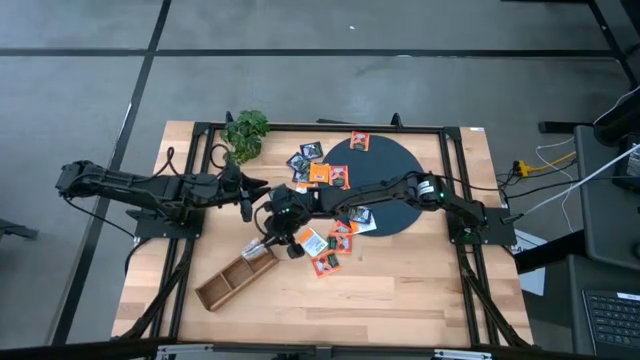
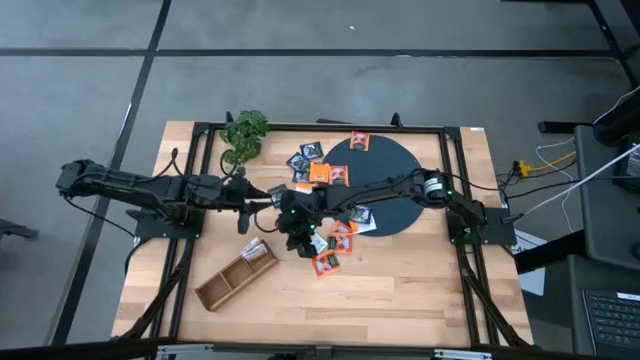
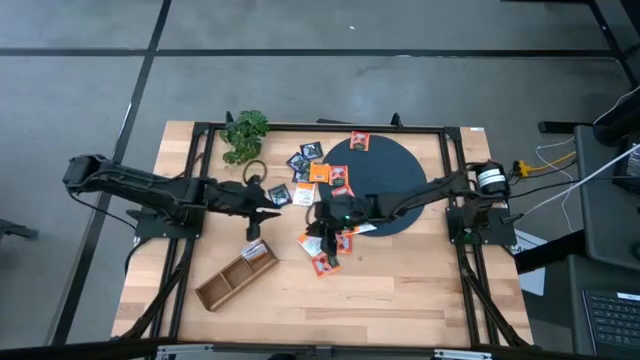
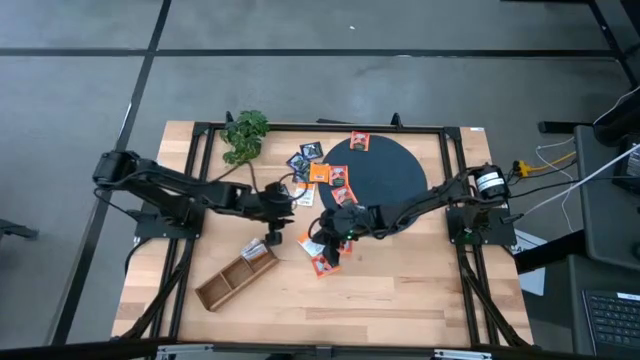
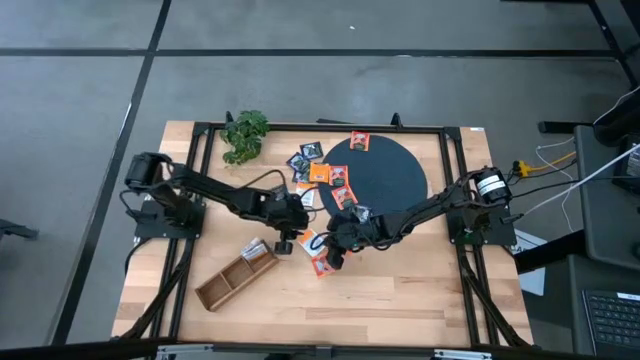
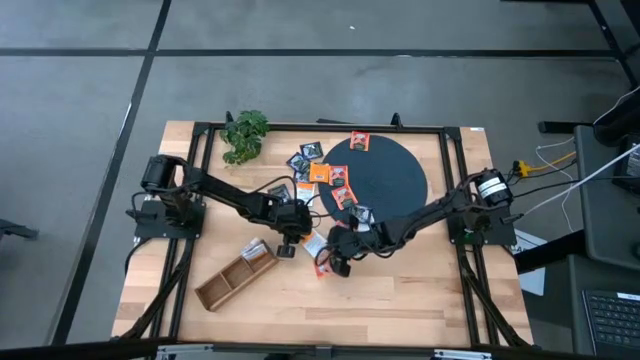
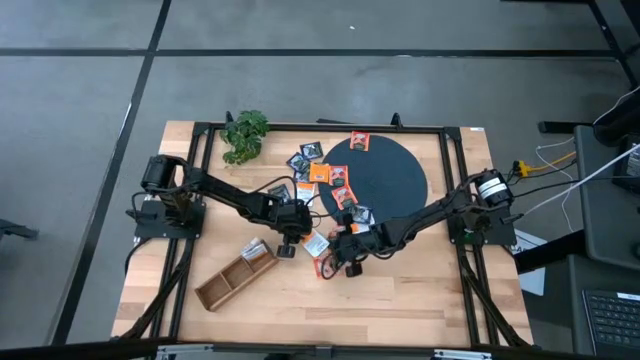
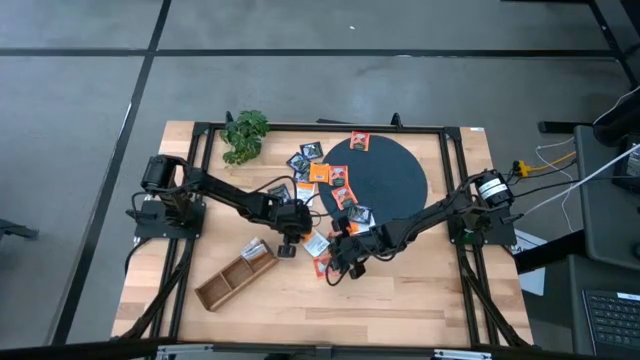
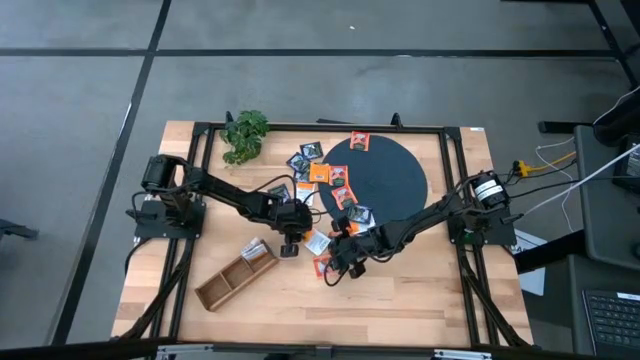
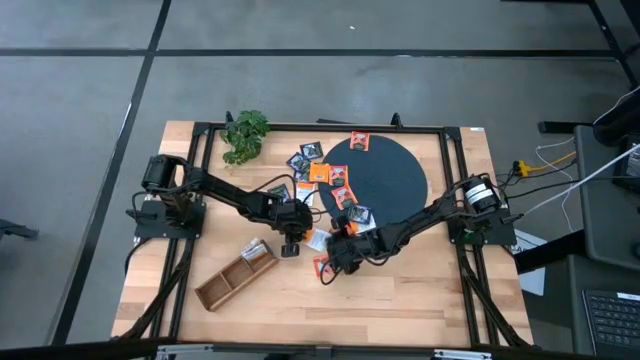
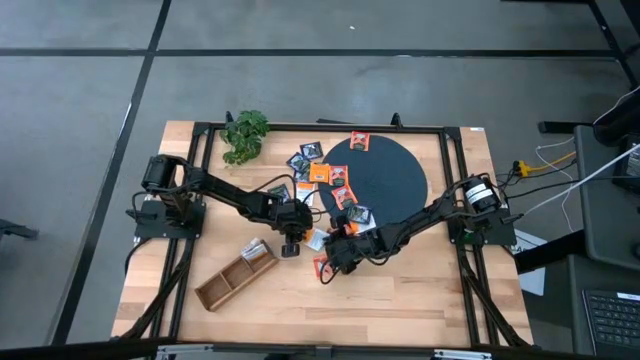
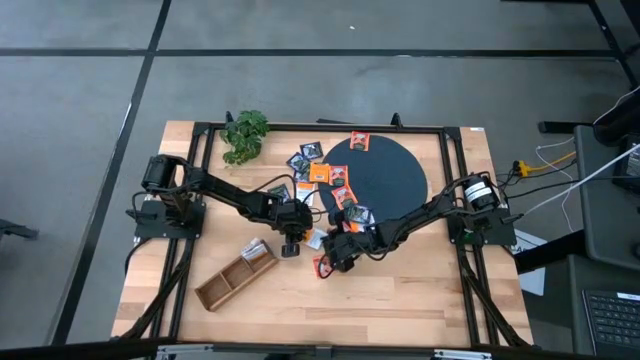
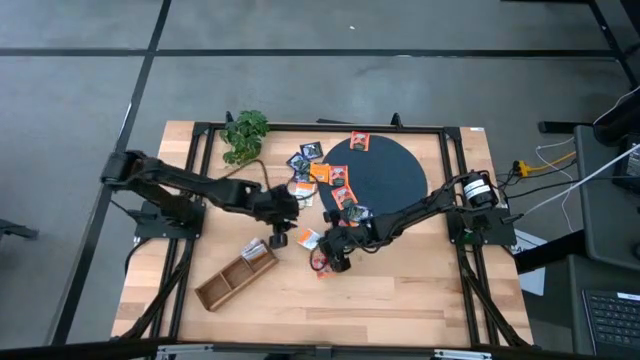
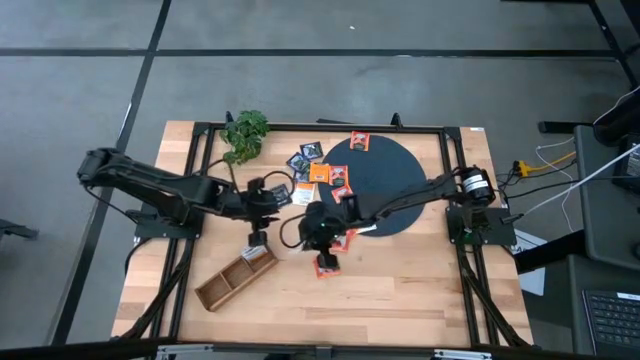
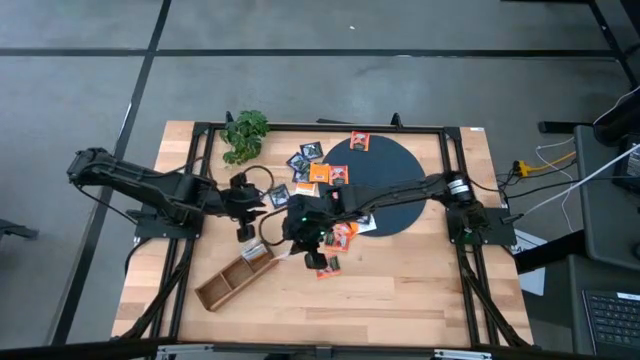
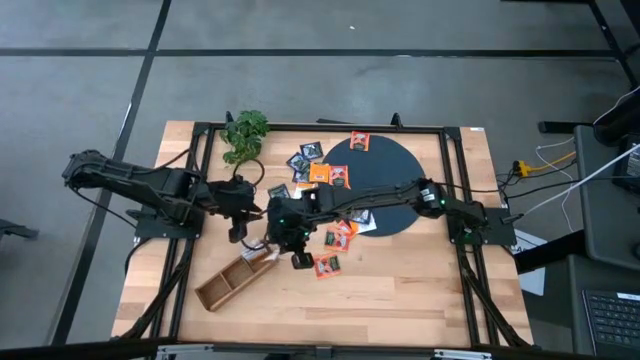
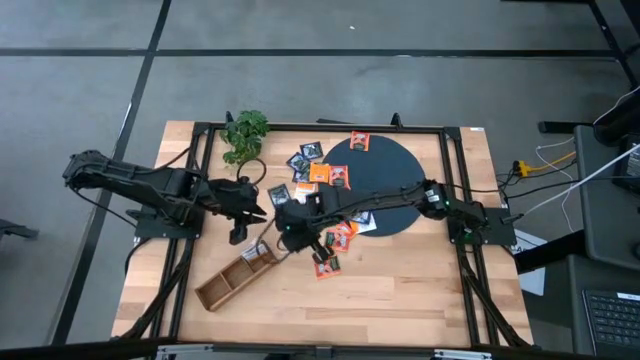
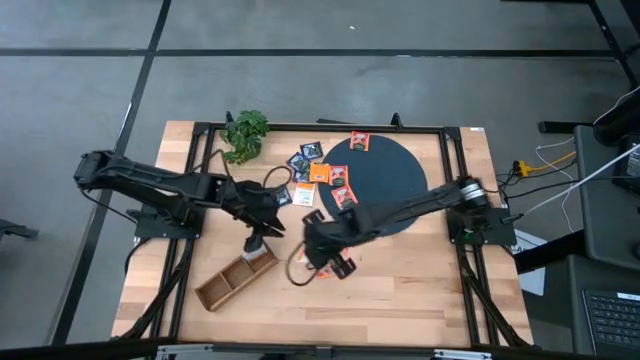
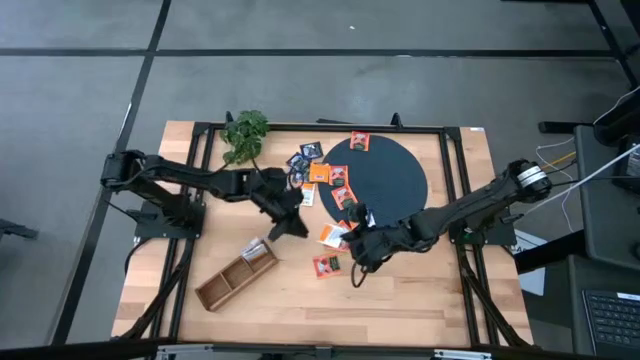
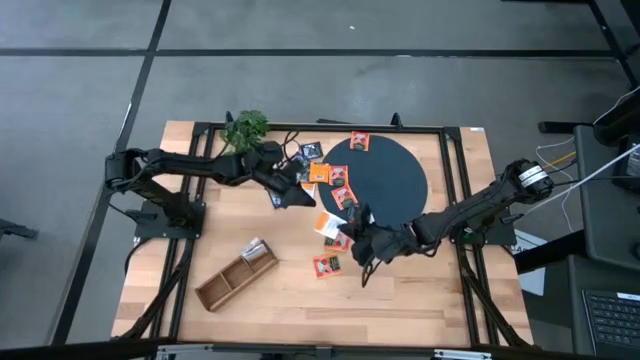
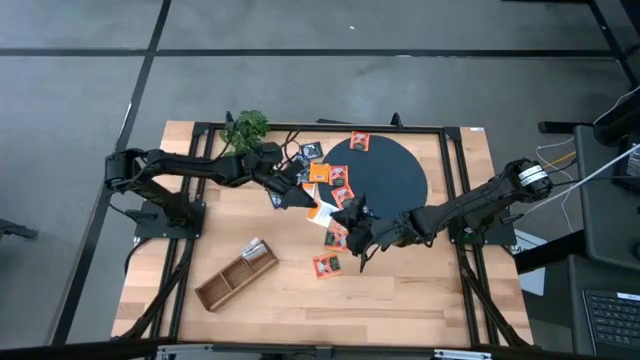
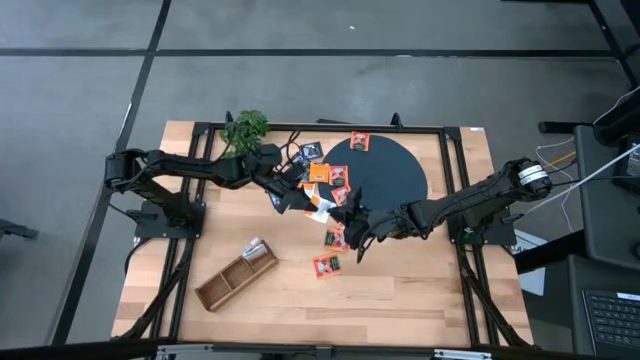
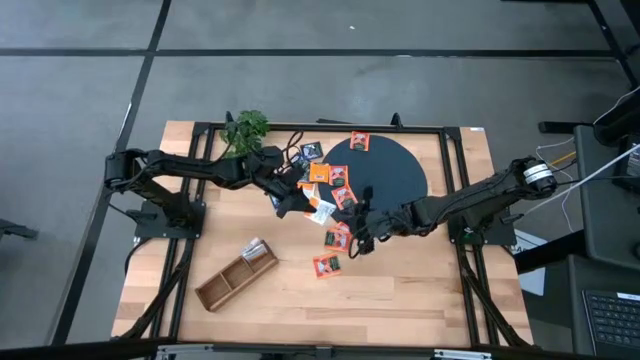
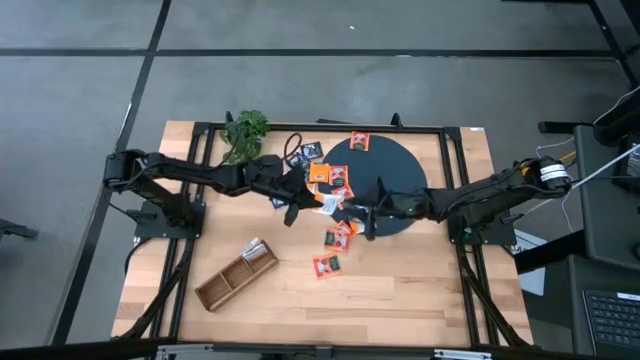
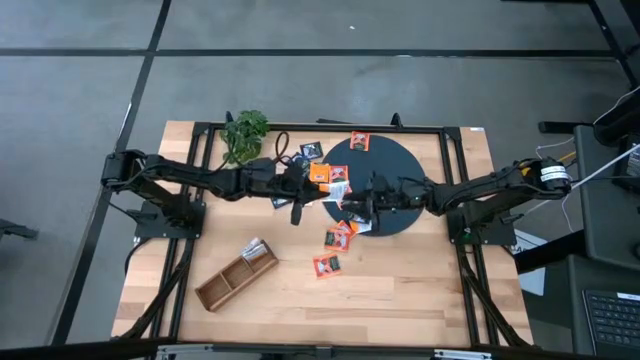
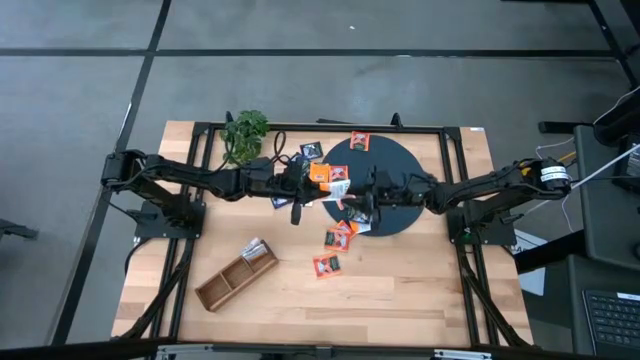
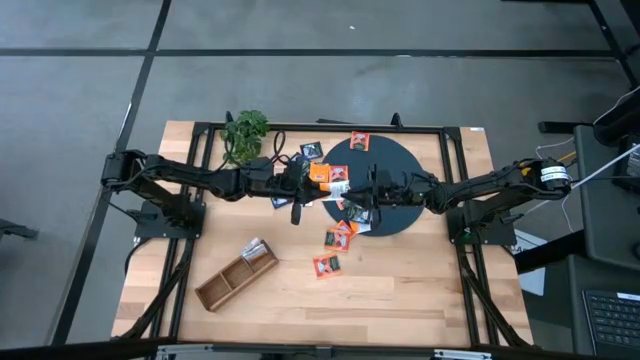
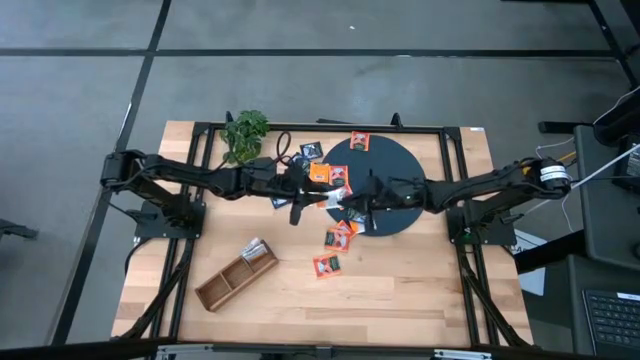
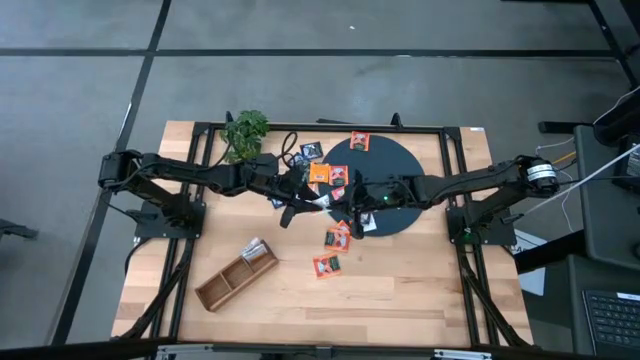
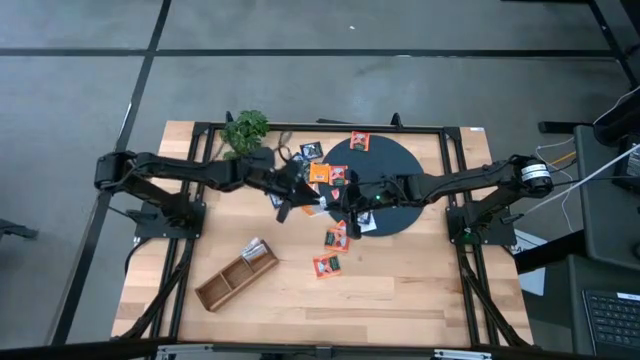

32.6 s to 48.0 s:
Task: Pick & Place Tea
Put the white tea bag into the right section of the wooden organizer

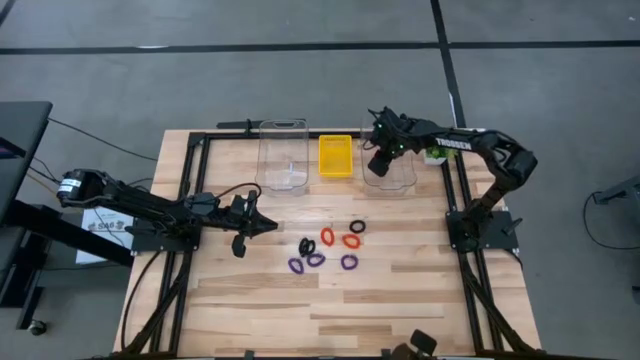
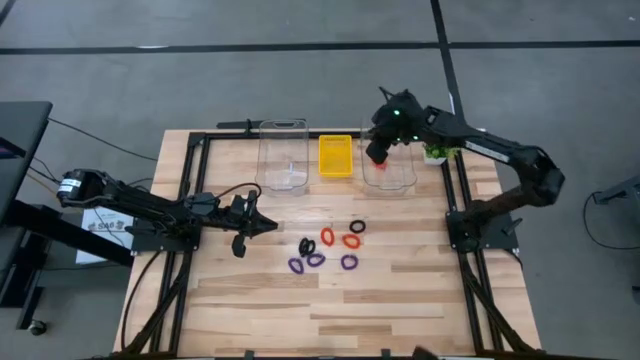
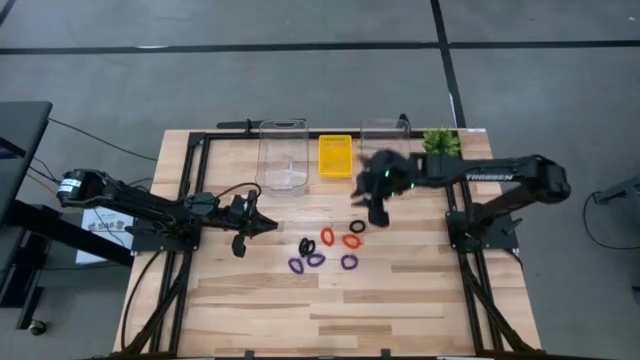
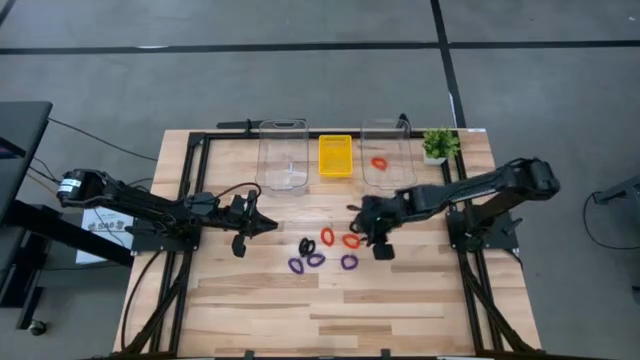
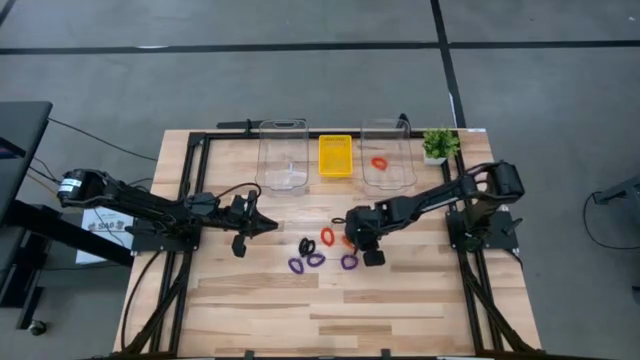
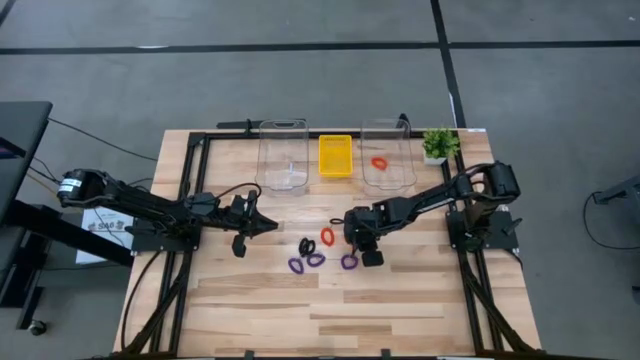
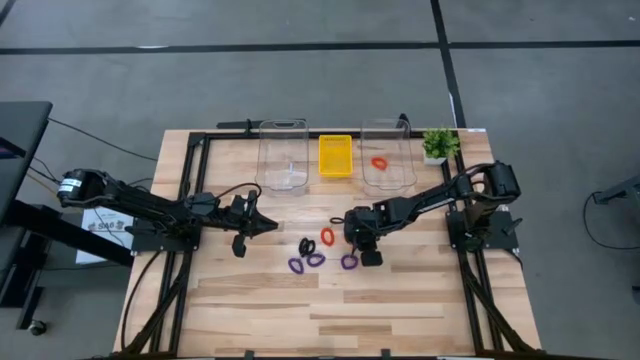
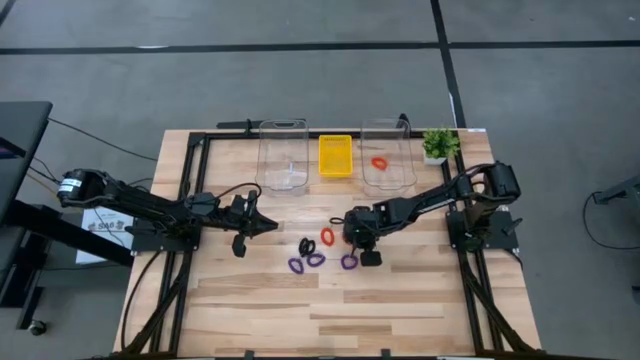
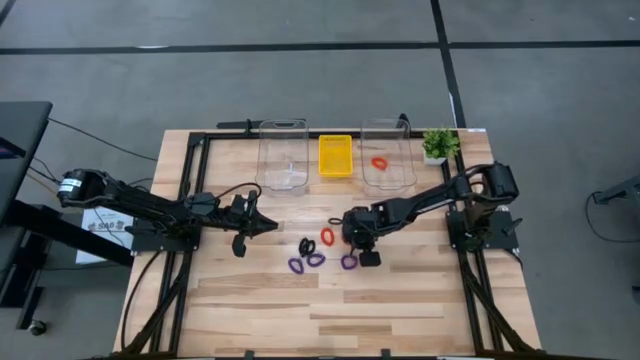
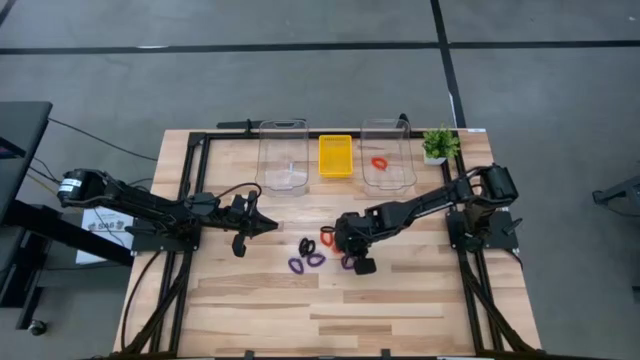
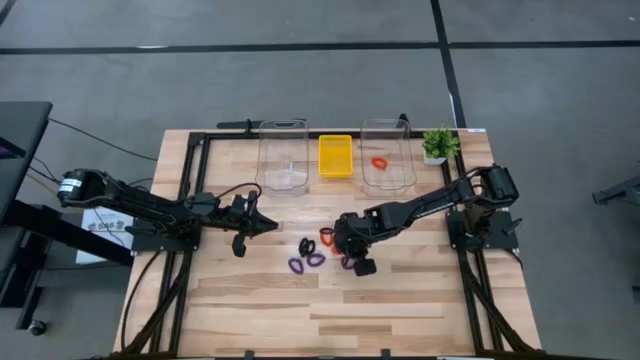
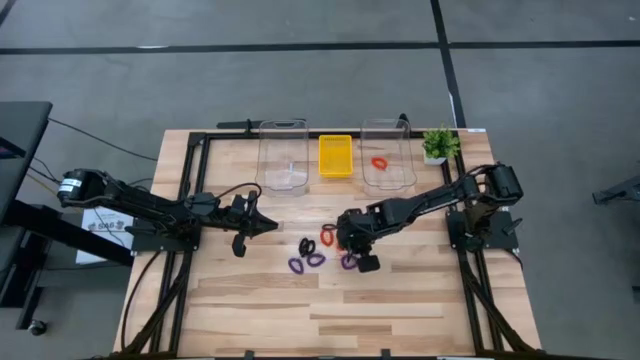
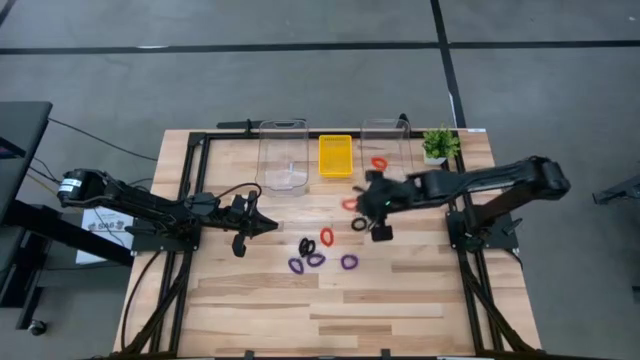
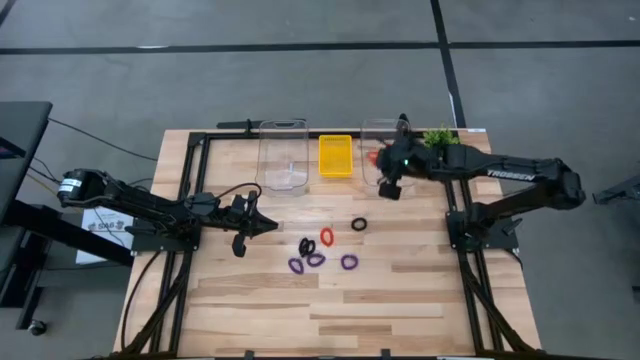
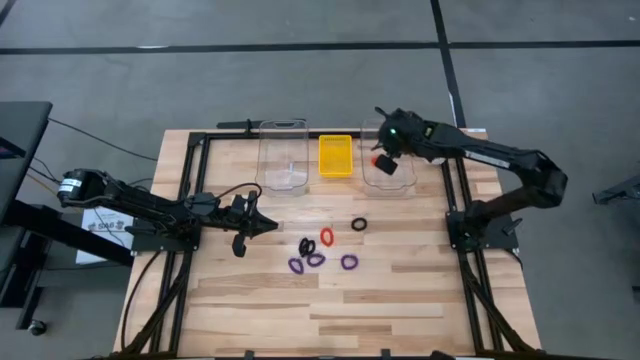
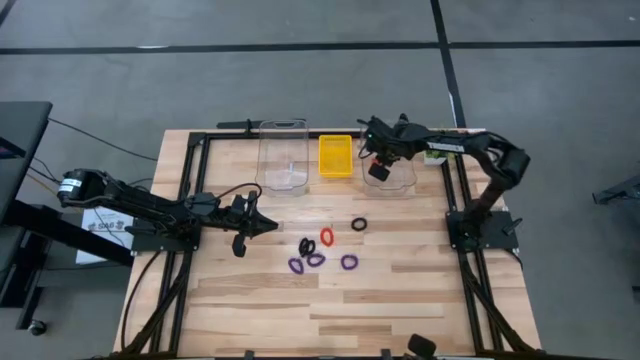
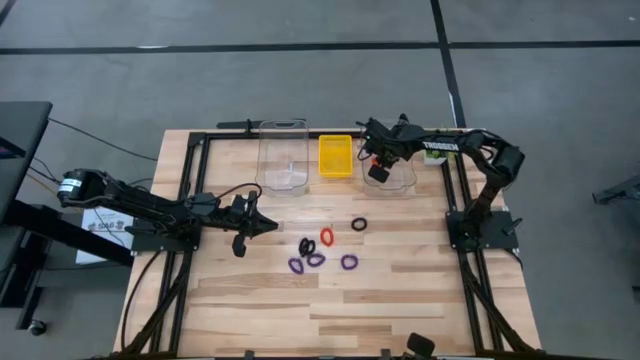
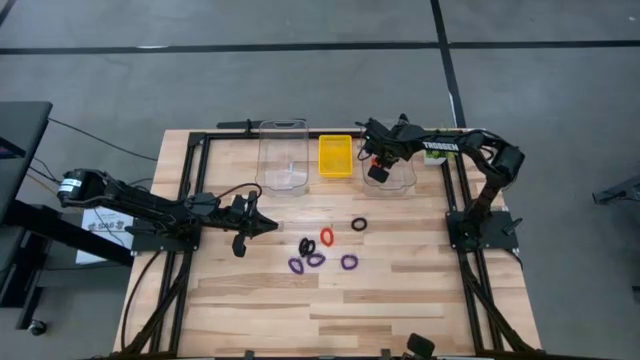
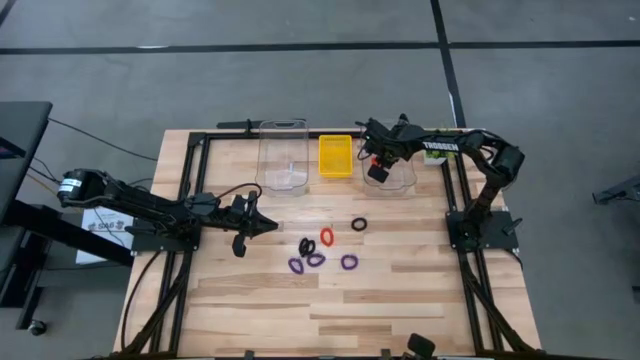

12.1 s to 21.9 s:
Task: Sort spring keychains
Put the right orange spring keychain into the right transparent bin
